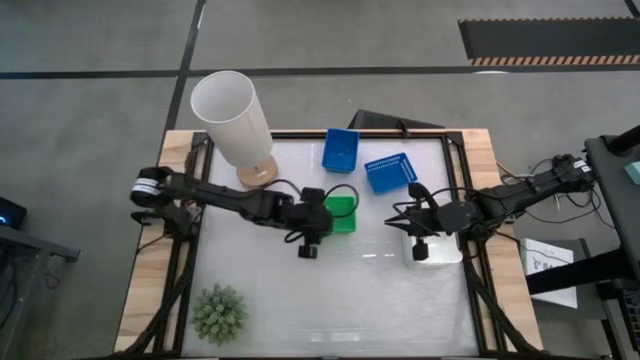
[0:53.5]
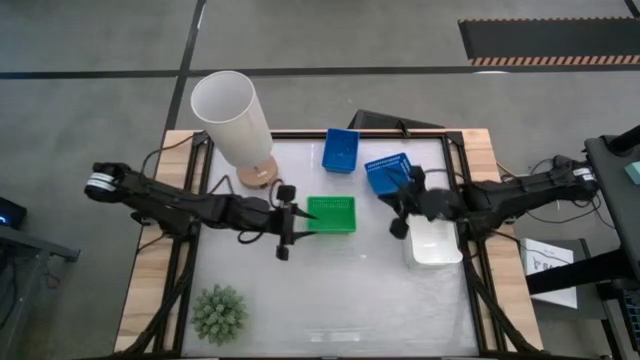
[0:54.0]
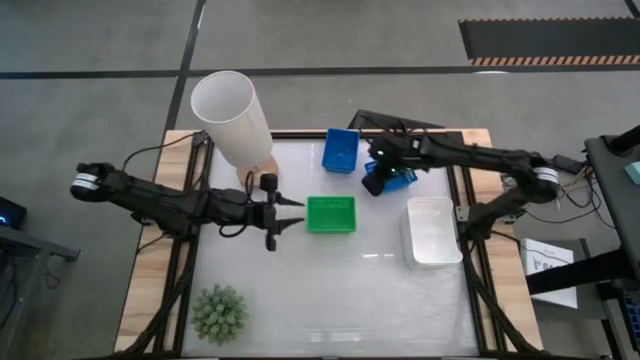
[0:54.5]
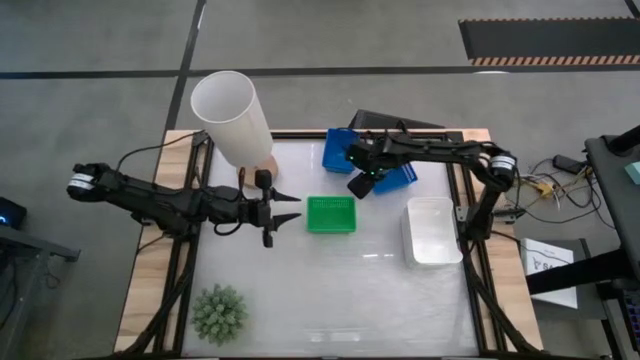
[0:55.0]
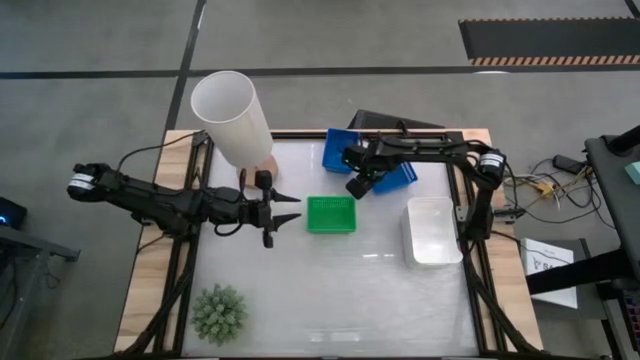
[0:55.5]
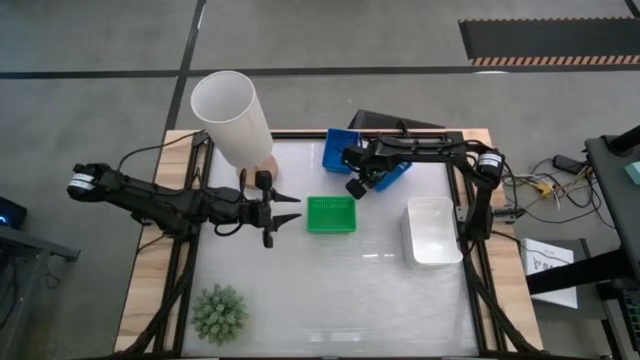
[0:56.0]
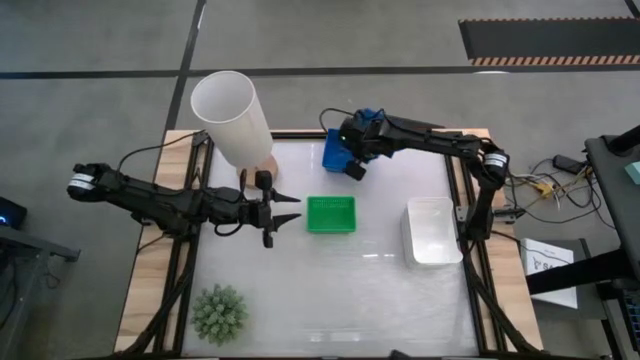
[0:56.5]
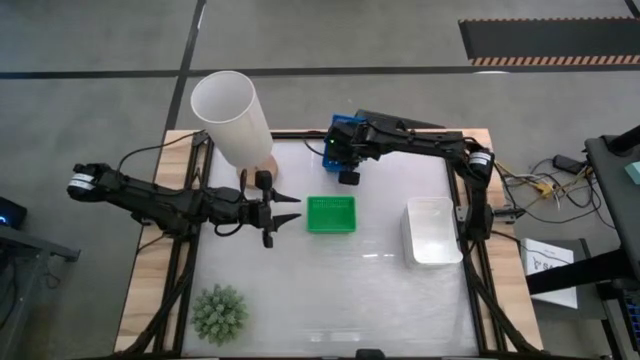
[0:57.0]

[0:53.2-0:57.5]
Stack the right blue bin on top of the left blue bins

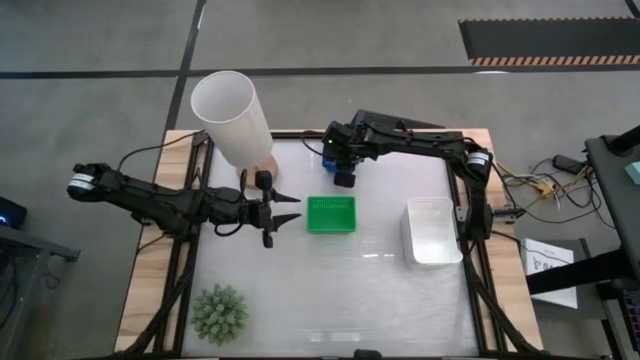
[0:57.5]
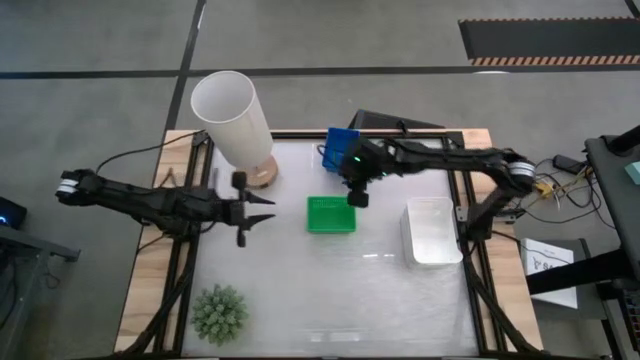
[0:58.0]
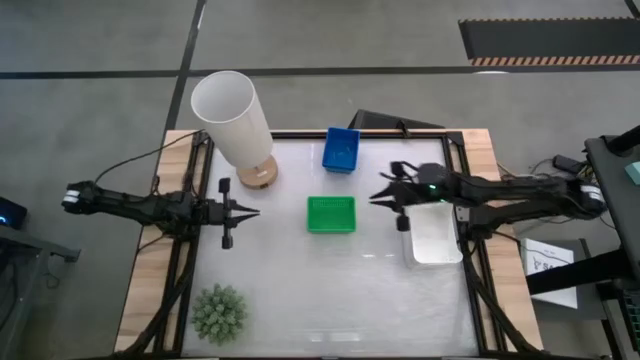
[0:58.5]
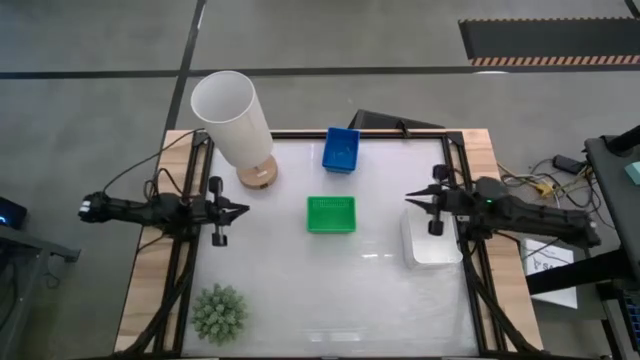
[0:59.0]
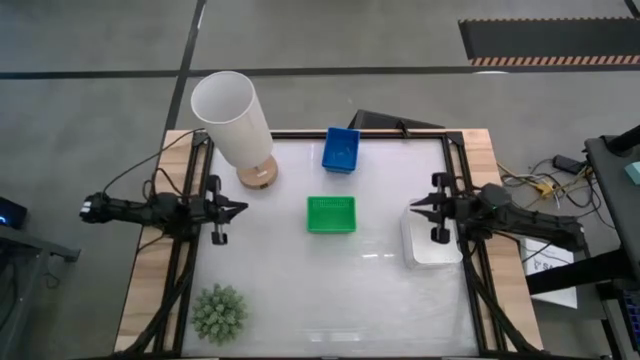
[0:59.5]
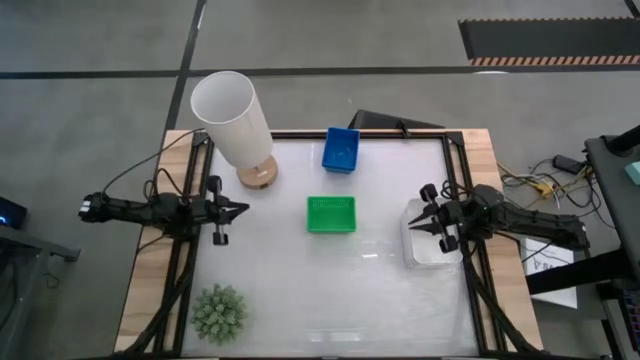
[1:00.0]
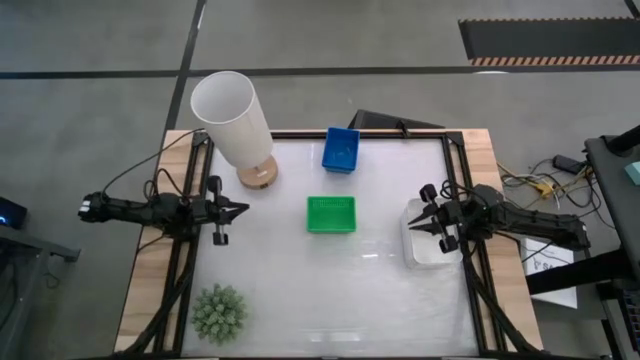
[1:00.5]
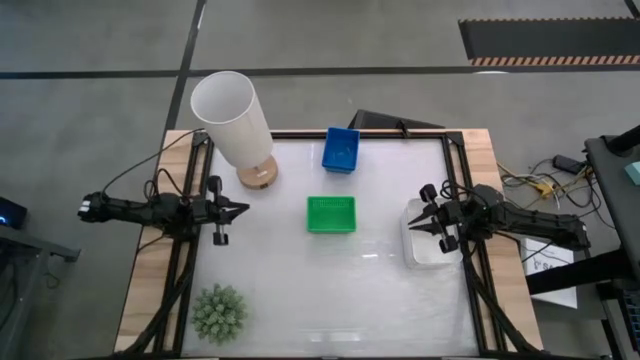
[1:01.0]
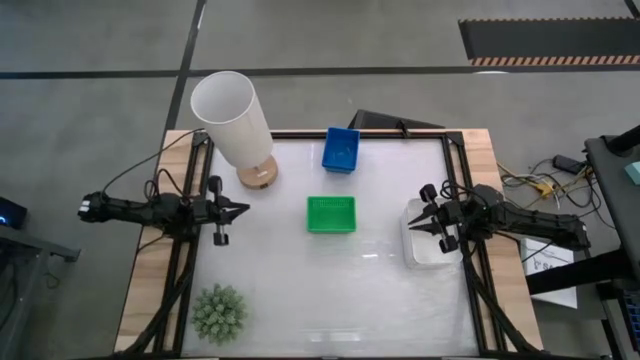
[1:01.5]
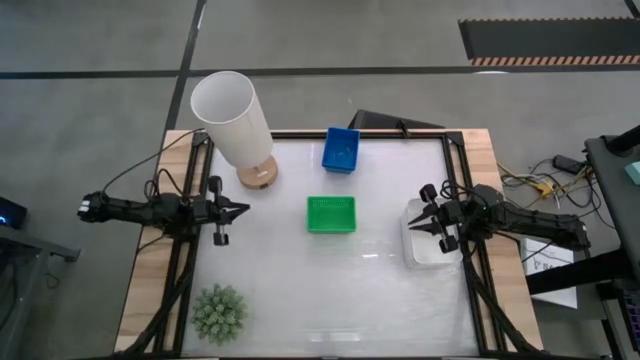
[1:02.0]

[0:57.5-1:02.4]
Return to Home Position
